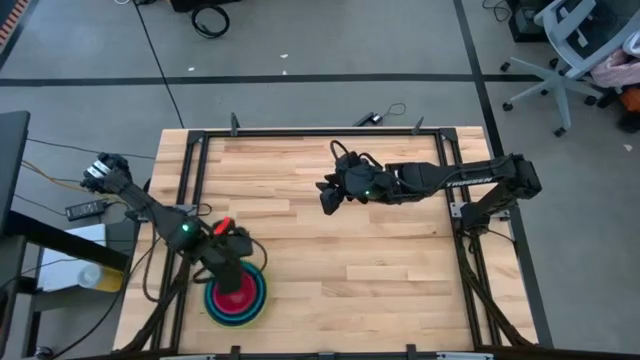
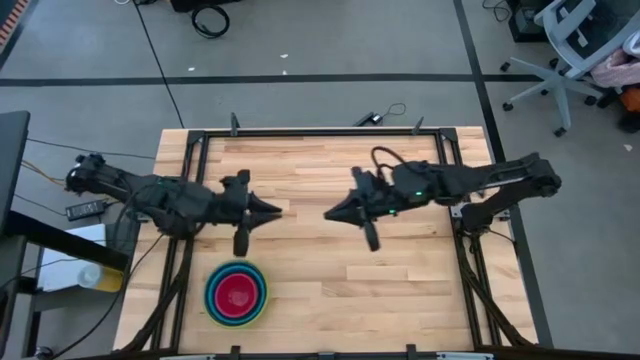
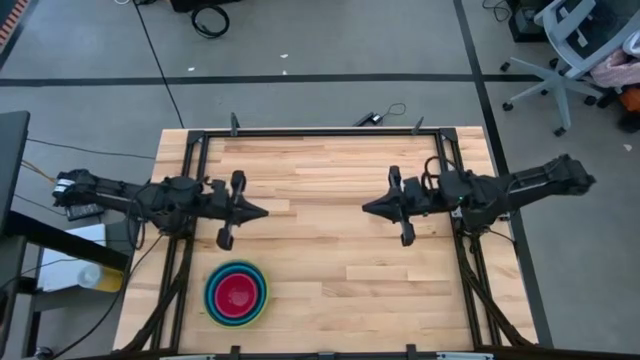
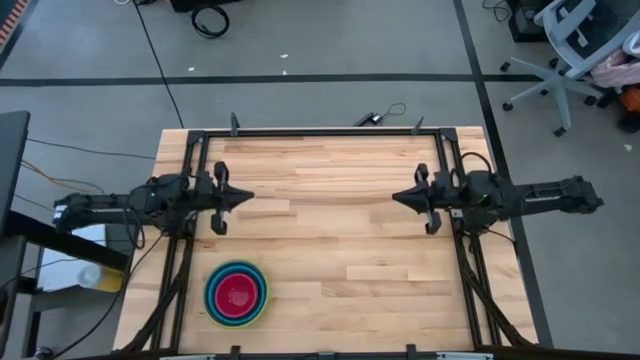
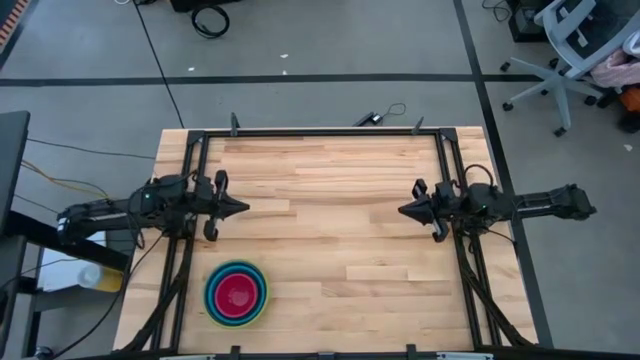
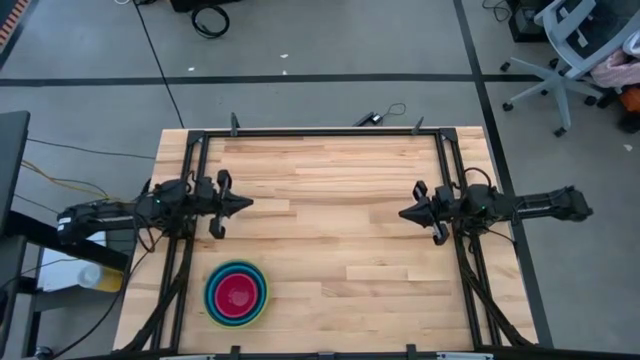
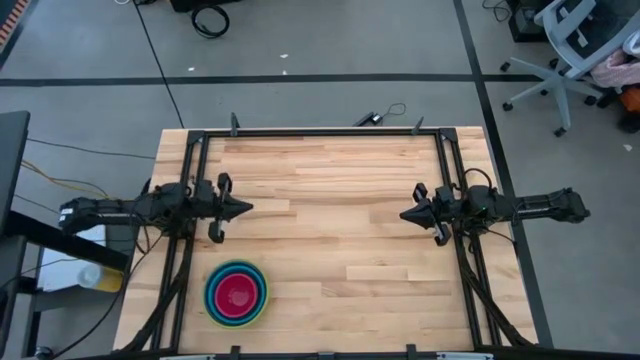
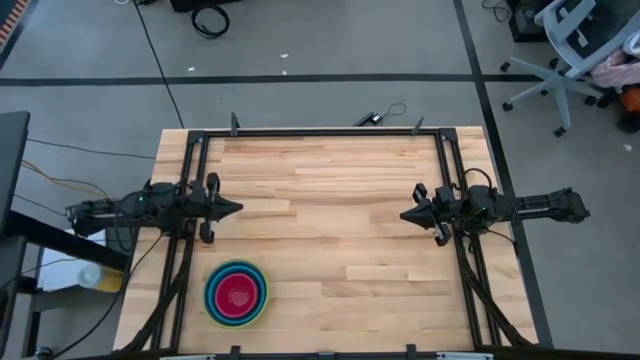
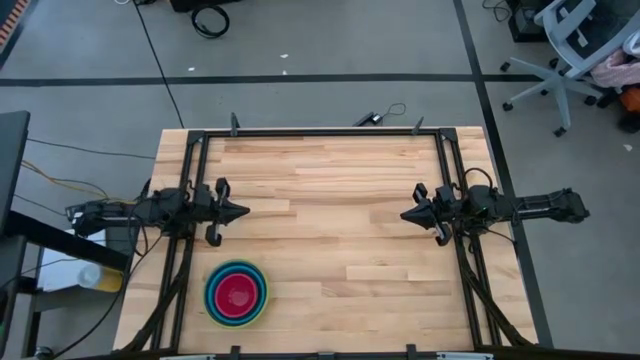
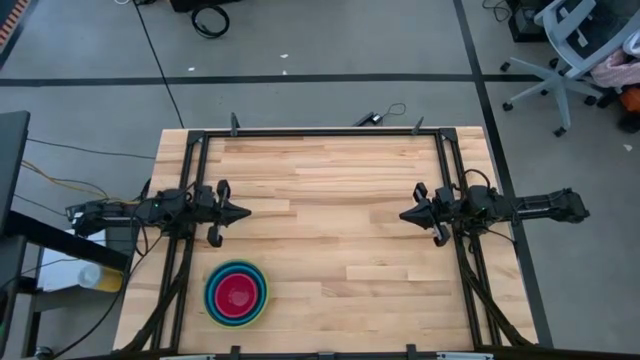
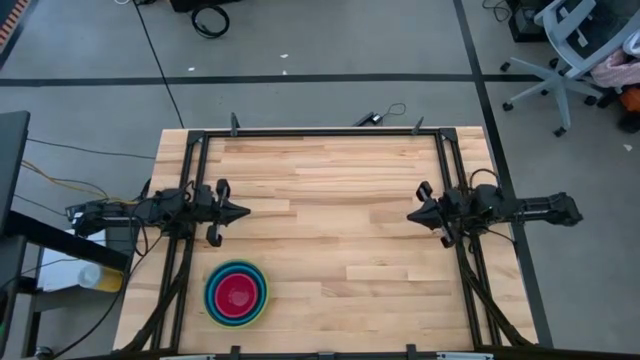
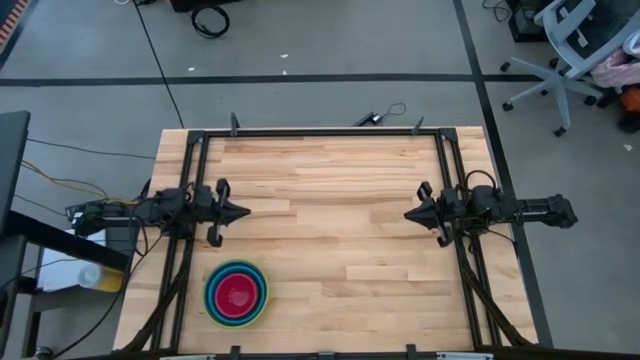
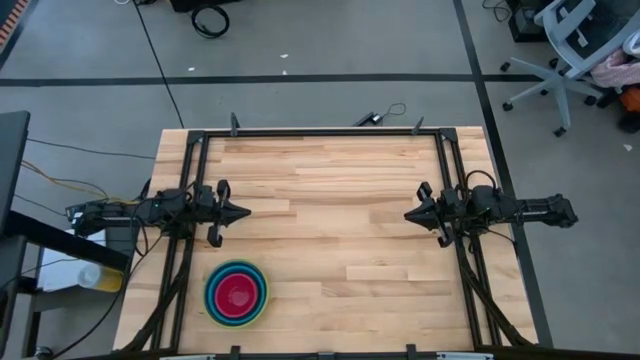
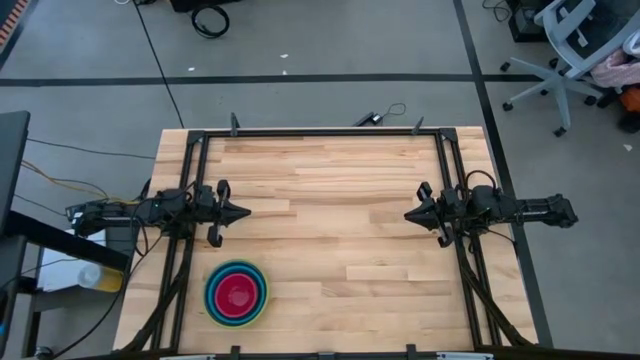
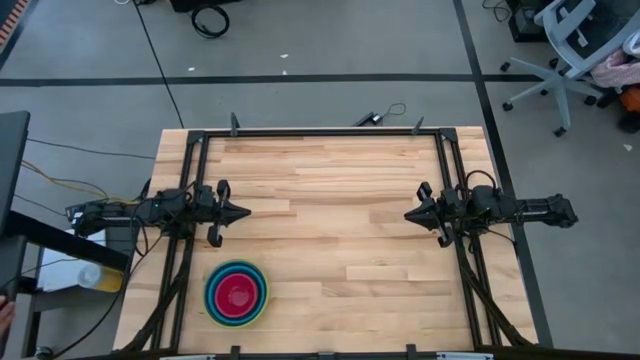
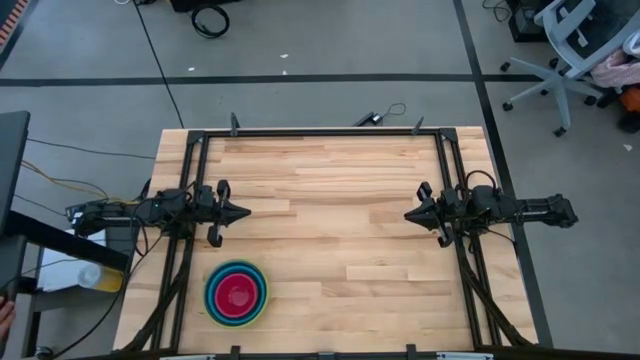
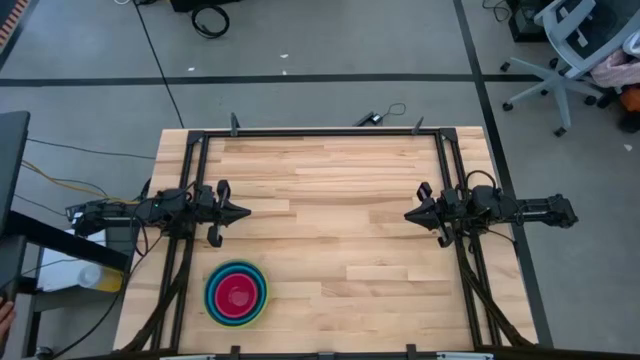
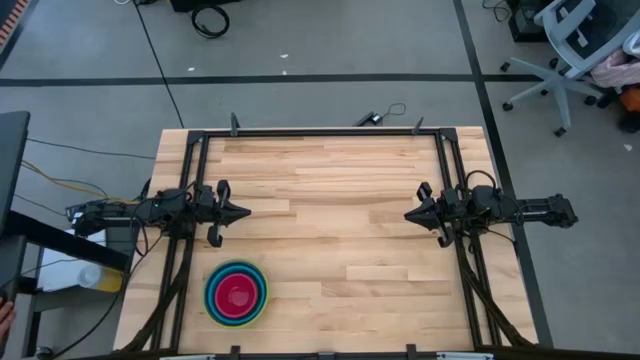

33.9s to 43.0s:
Return to Home Position
